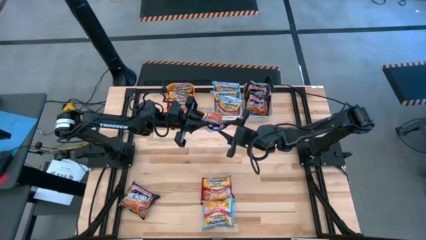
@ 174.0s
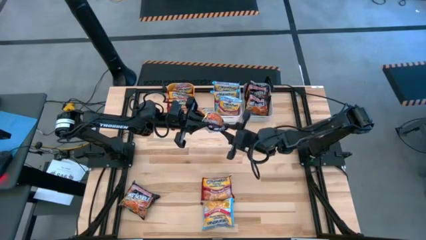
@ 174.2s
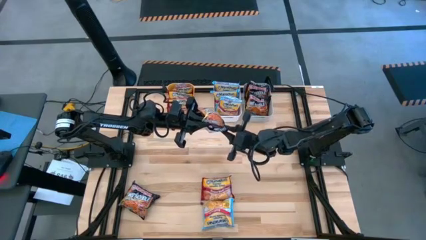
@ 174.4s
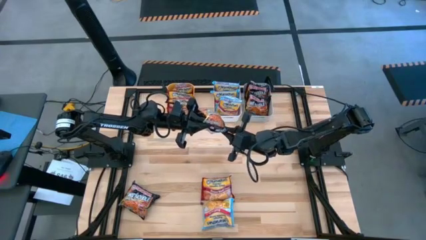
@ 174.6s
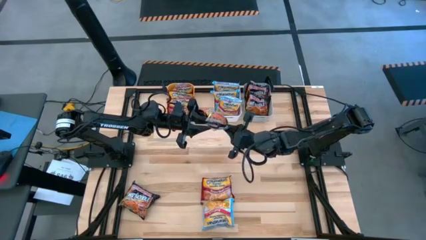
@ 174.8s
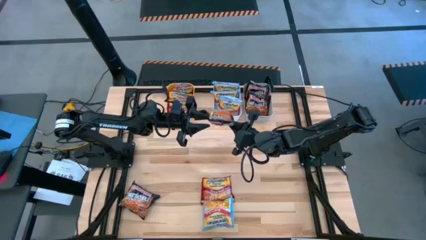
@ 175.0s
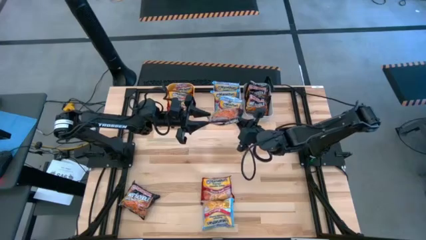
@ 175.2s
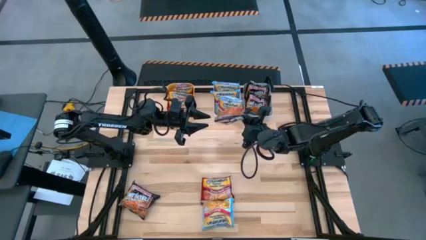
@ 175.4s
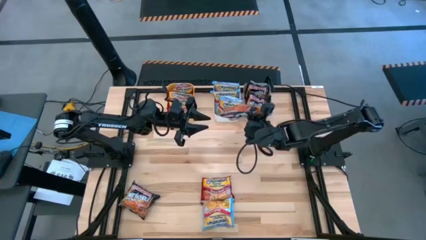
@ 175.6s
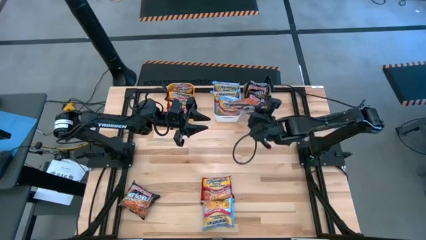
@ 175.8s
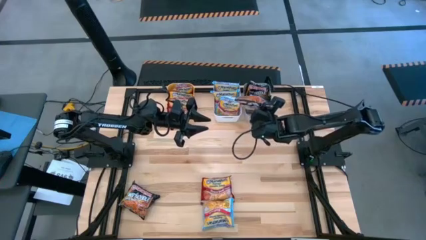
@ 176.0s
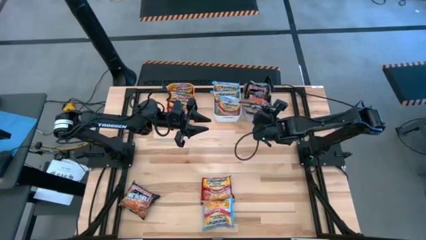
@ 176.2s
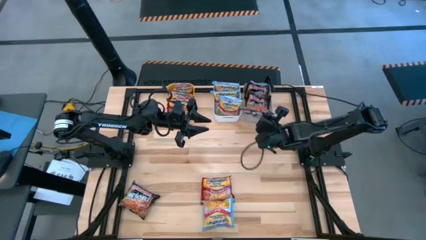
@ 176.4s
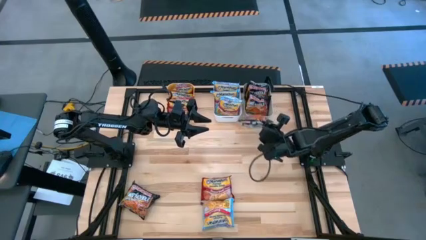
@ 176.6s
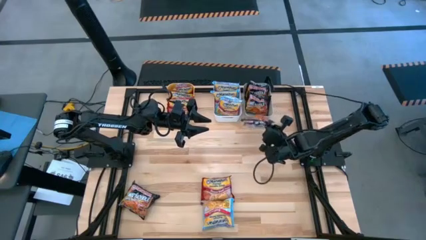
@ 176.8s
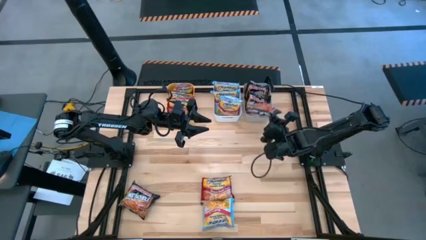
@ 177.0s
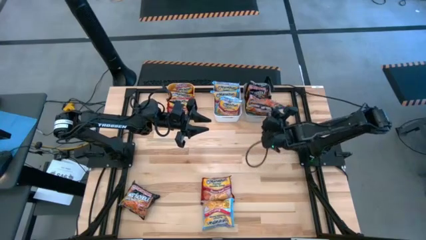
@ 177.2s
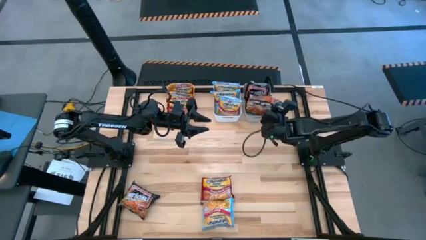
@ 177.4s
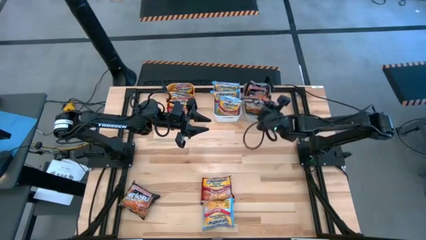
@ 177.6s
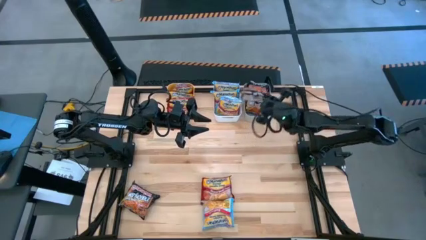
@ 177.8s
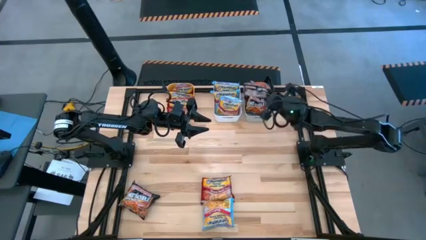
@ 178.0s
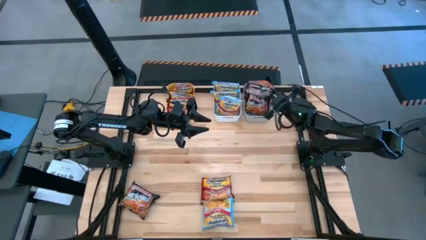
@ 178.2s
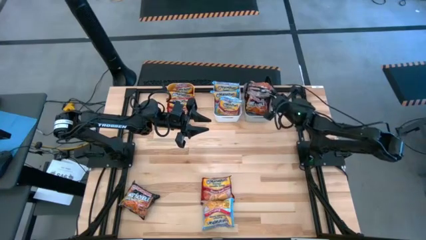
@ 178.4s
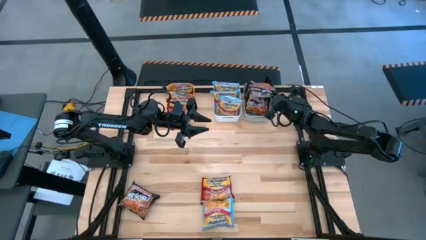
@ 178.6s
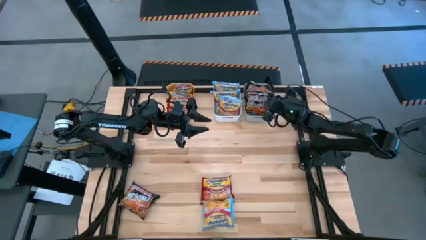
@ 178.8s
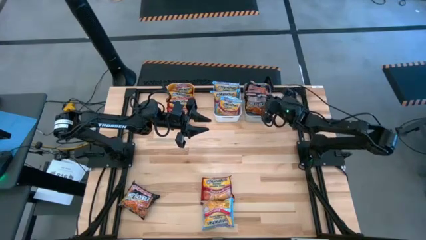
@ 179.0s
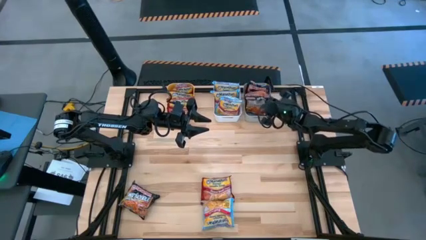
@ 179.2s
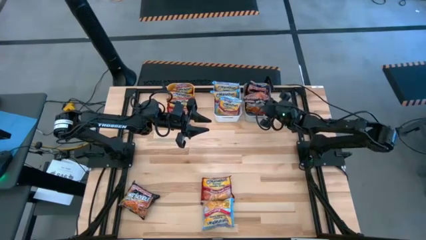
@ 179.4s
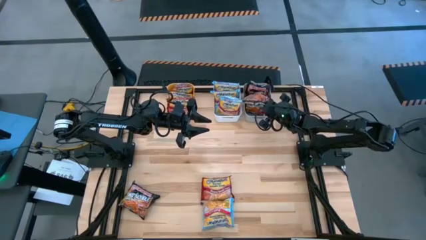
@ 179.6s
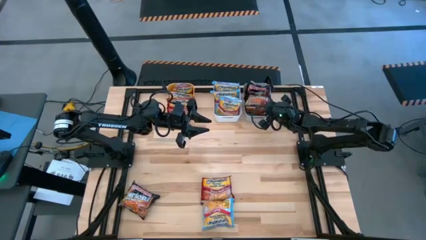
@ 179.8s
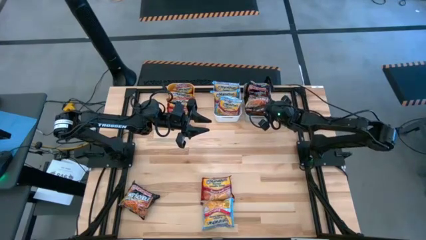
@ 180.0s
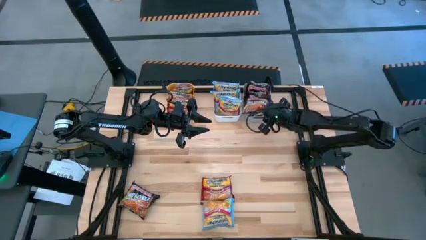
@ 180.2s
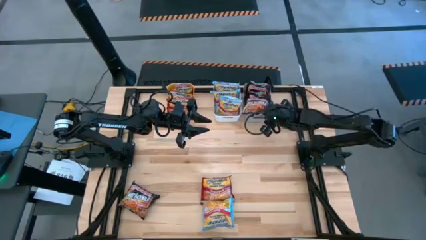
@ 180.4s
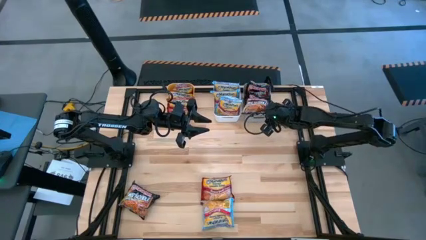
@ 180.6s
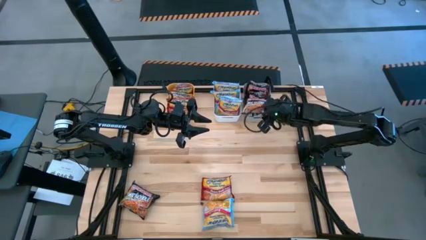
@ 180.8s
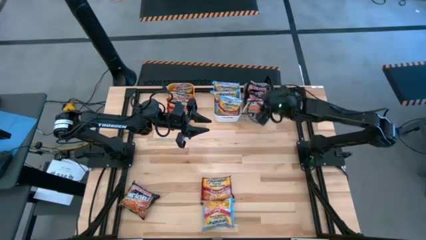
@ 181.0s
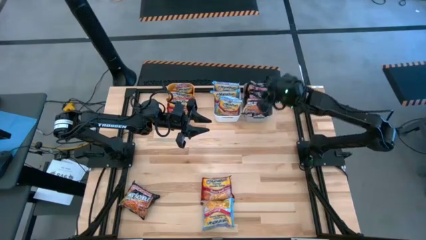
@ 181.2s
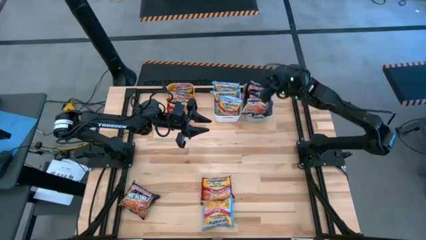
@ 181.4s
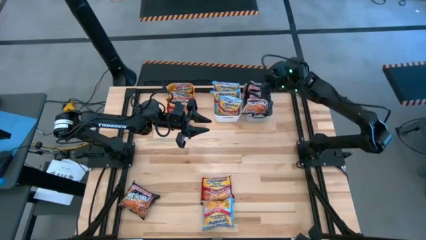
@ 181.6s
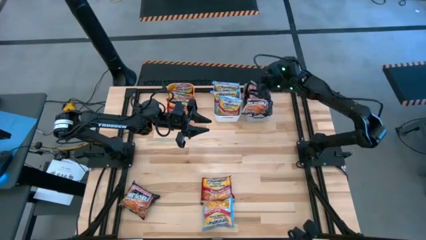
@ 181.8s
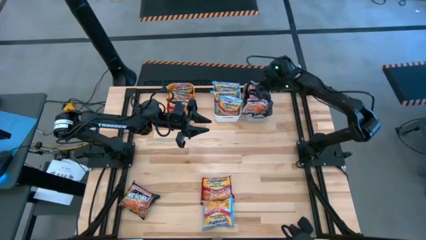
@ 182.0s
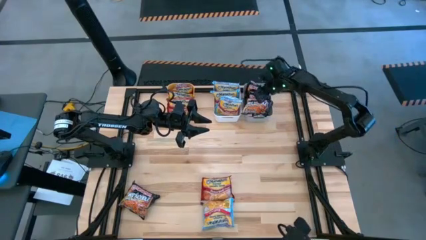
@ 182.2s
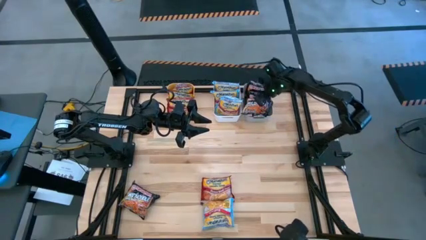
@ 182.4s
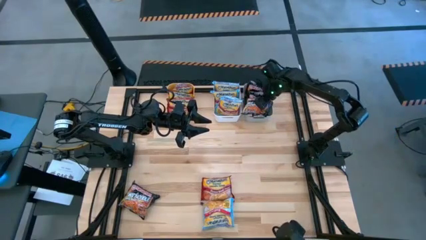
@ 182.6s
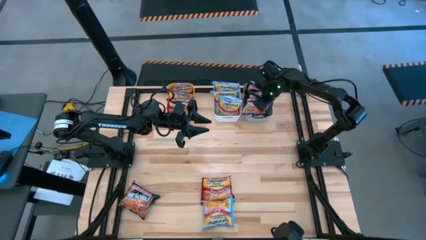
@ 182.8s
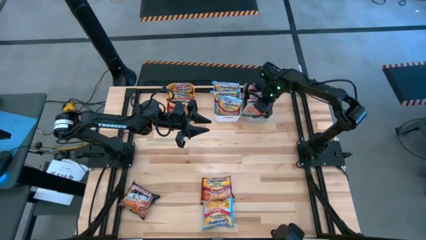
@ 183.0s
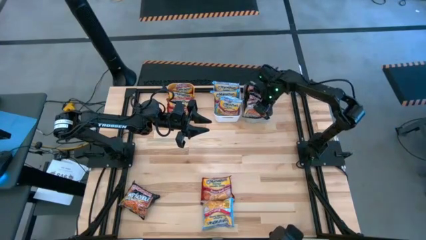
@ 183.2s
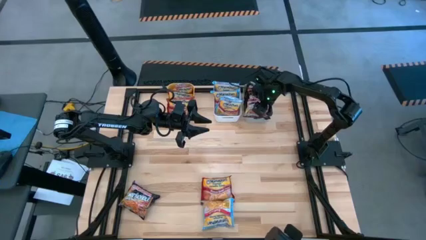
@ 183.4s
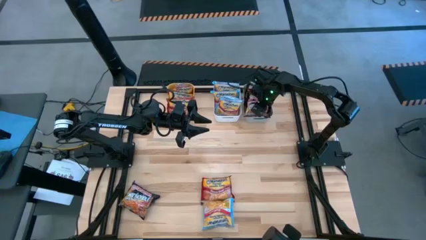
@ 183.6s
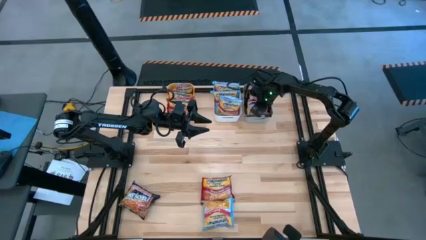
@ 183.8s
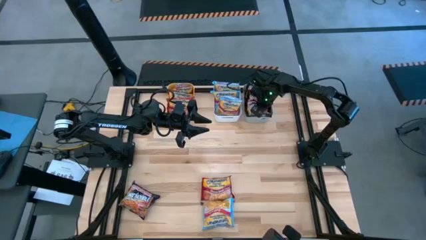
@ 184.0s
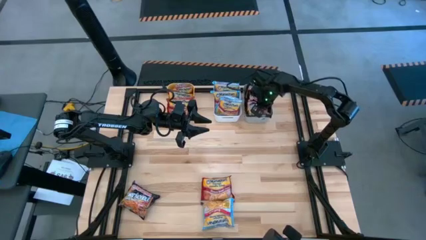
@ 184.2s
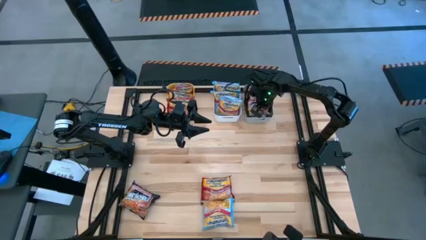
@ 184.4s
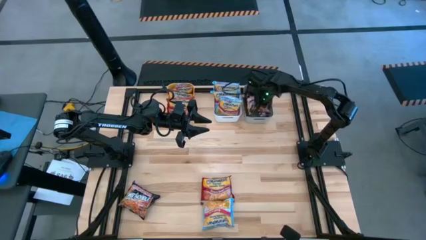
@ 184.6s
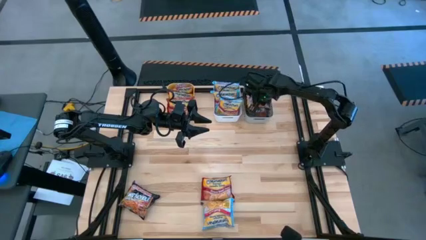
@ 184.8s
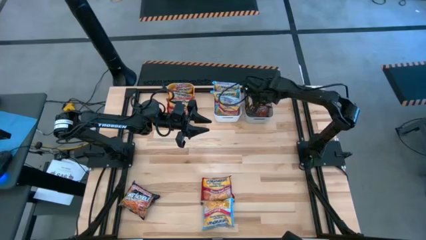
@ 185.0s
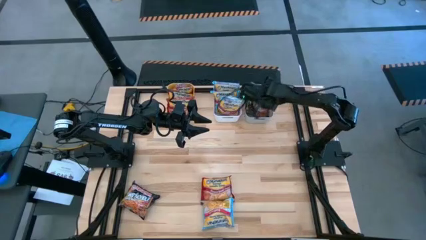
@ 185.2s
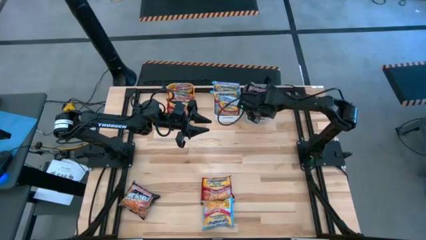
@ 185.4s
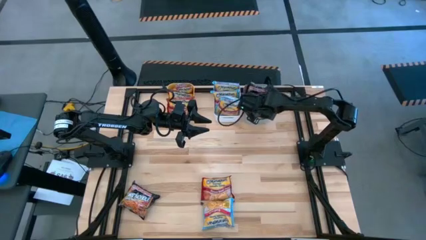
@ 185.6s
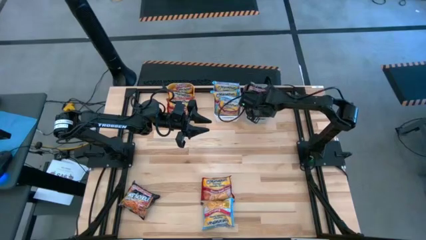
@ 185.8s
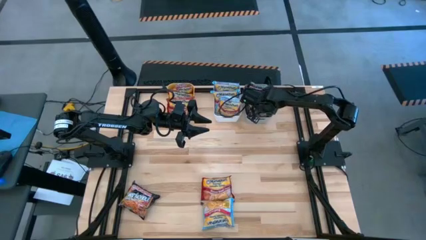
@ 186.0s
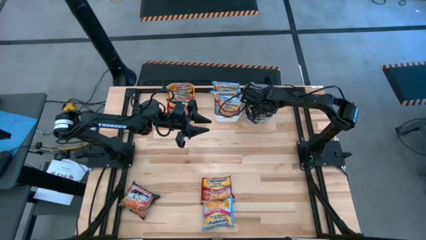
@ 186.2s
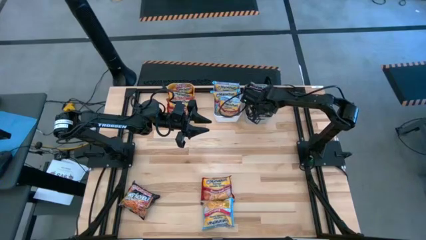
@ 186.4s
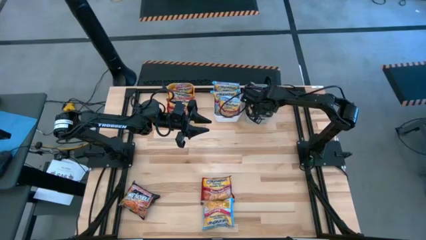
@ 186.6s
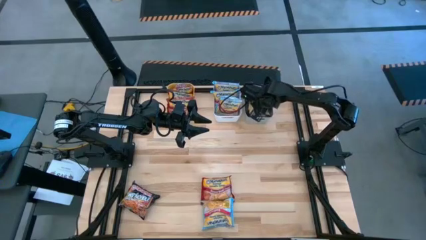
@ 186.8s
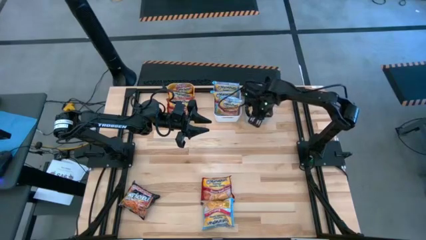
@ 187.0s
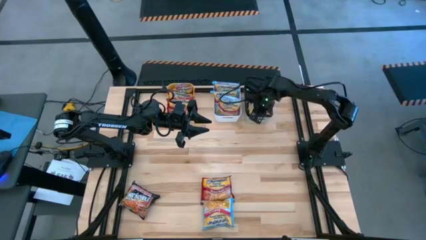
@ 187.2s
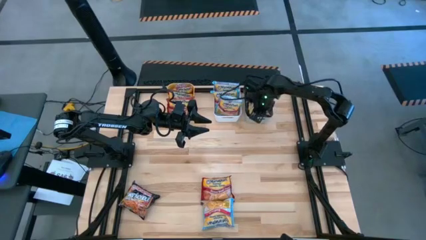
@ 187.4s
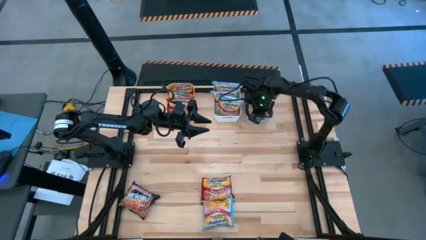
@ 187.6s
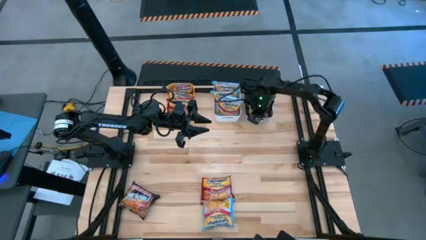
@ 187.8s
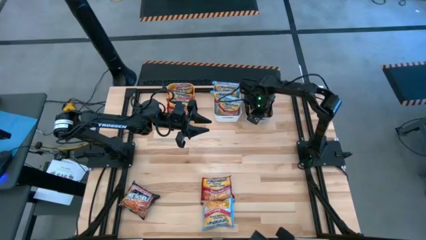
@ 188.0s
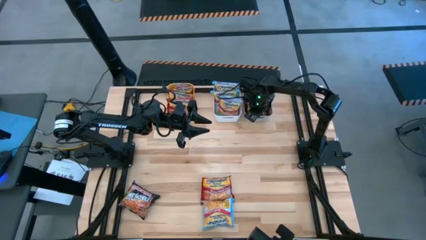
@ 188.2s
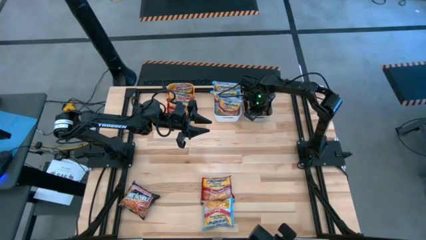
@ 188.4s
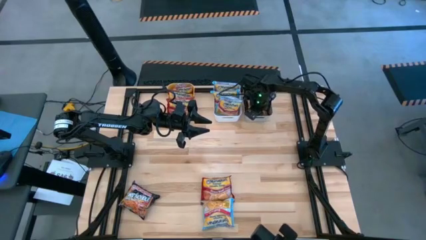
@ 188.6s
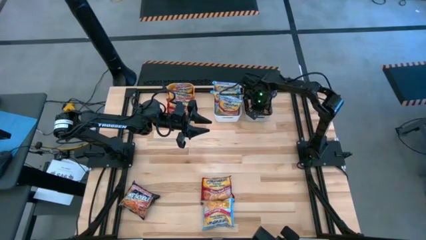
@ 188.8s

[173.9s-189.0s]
Task: Sort Maruchan noodles
Put the black noodle pack into the gray bin

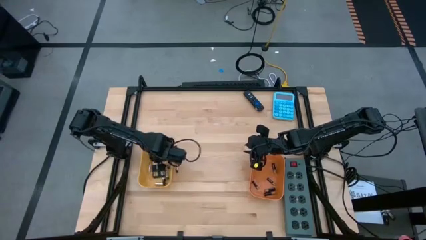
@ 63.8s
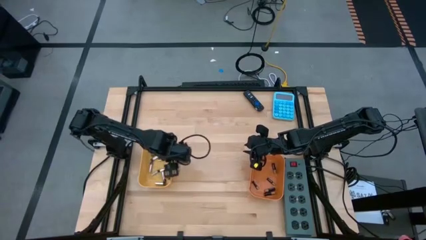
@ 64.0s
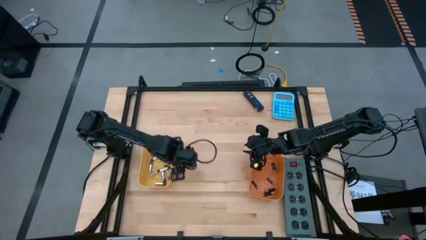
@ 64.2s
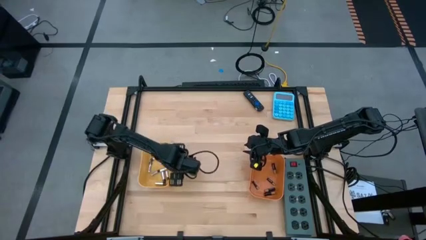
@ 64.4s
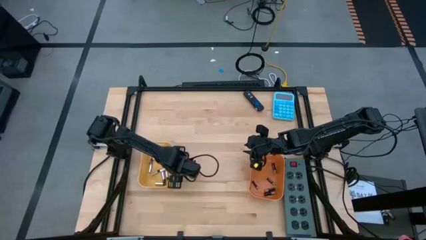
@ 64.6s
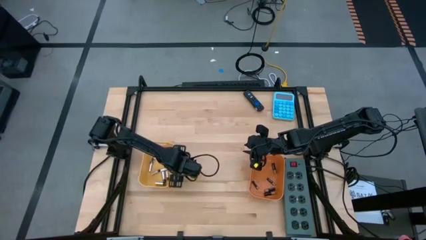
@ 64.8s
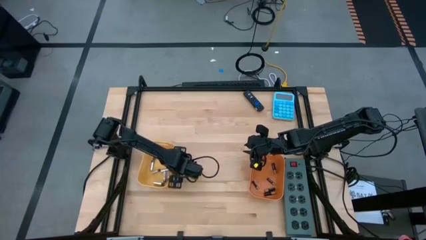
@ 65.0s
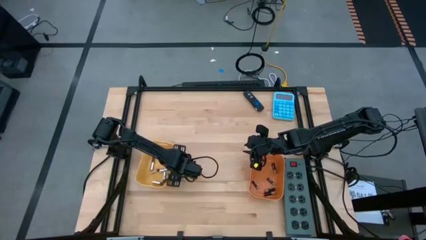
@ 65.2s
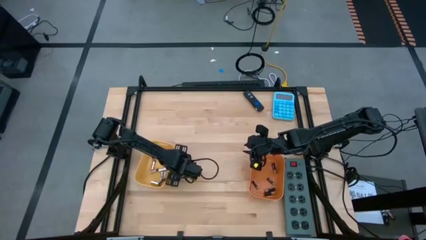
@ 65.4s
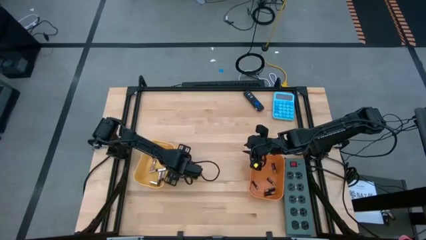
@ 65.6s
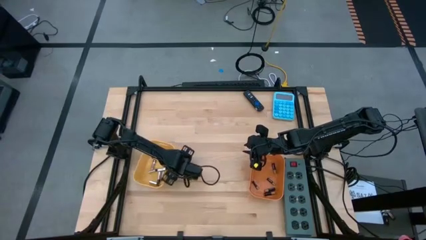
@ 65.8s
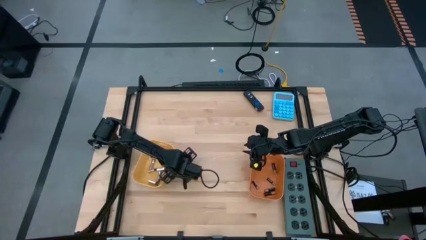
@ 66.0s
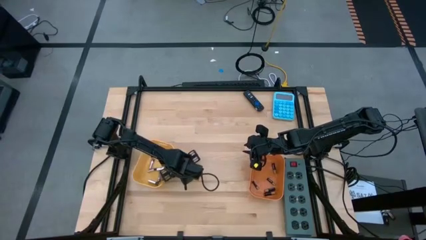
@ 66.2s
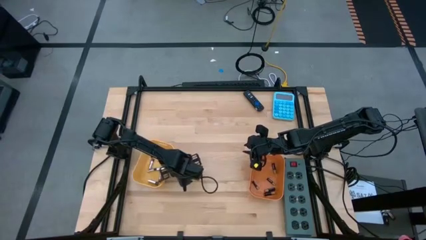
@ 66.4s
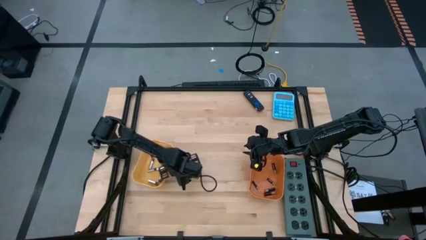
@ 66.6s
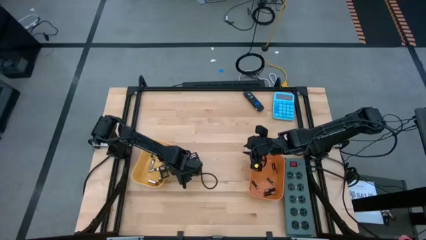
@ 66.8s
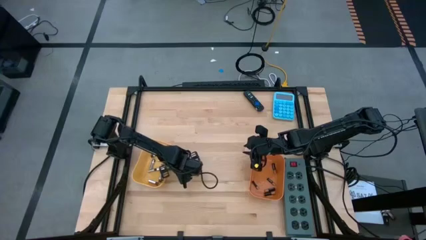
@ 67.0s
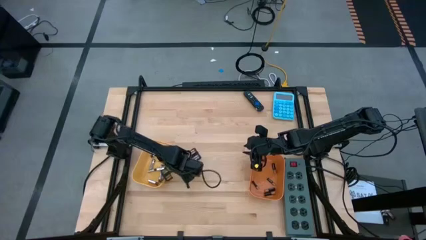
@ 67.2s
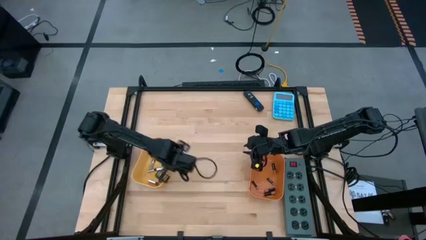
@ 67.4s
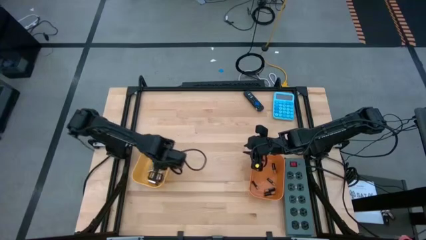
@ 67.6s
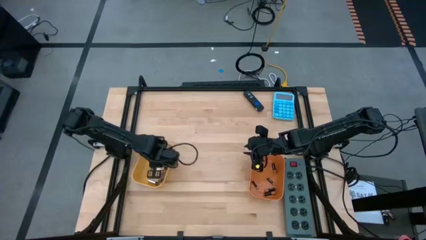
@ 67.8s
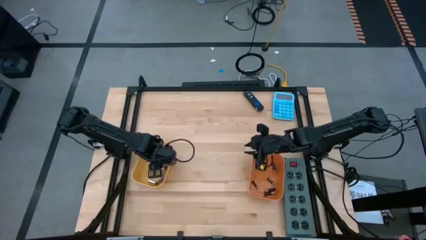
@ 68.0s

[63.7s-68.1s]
Task: Sort batteries
Put the silver battery into the yellow bin
